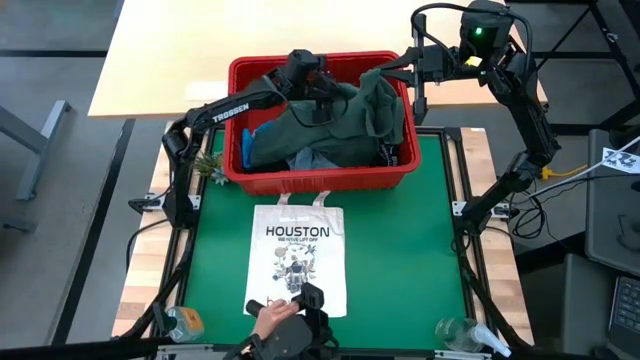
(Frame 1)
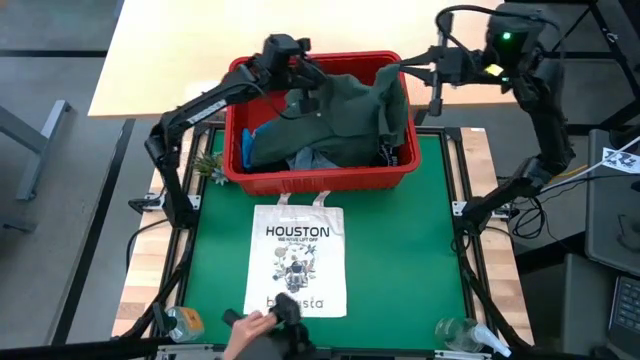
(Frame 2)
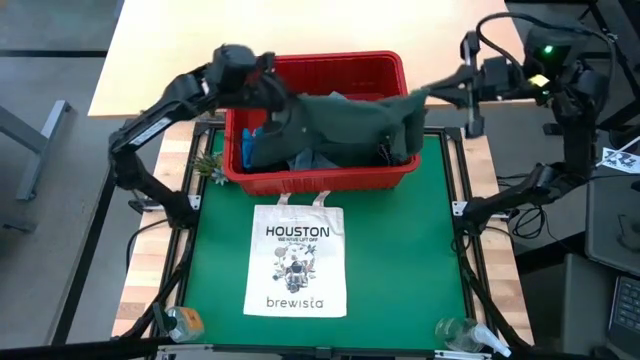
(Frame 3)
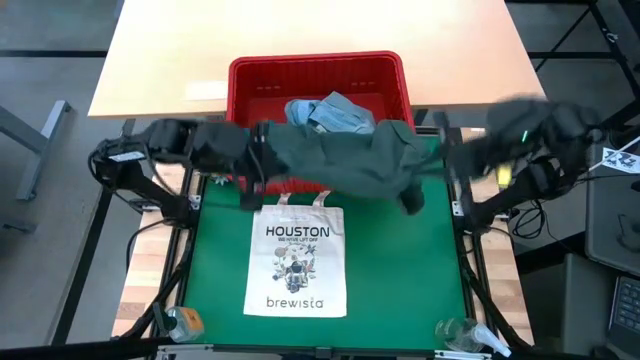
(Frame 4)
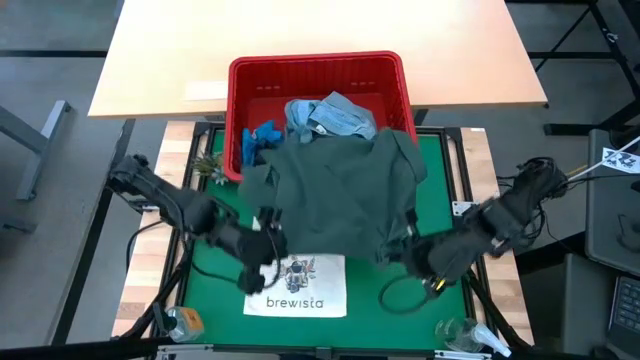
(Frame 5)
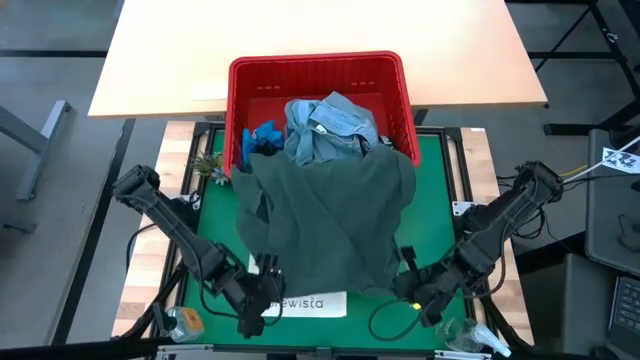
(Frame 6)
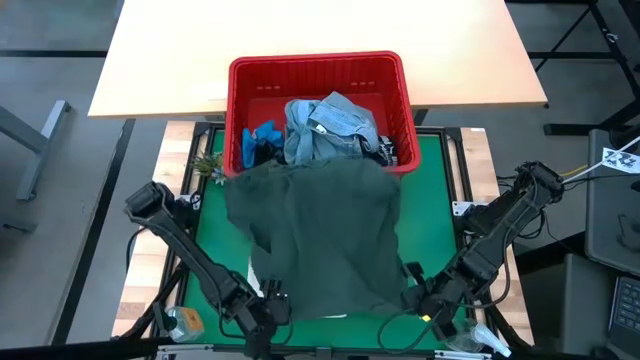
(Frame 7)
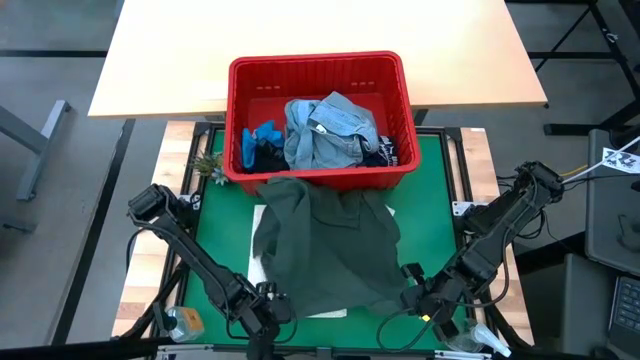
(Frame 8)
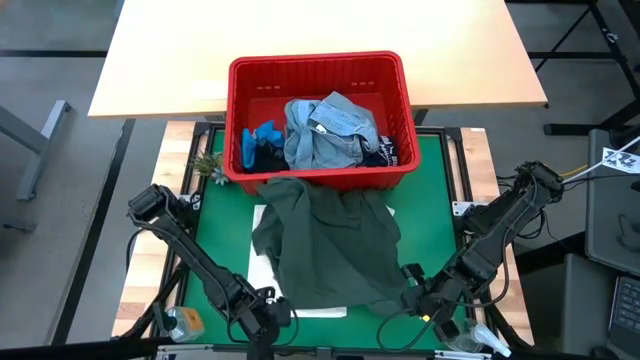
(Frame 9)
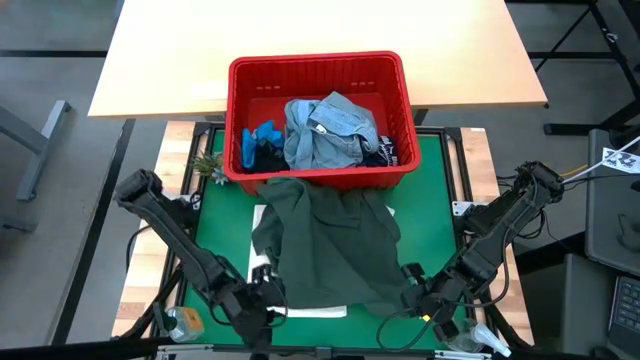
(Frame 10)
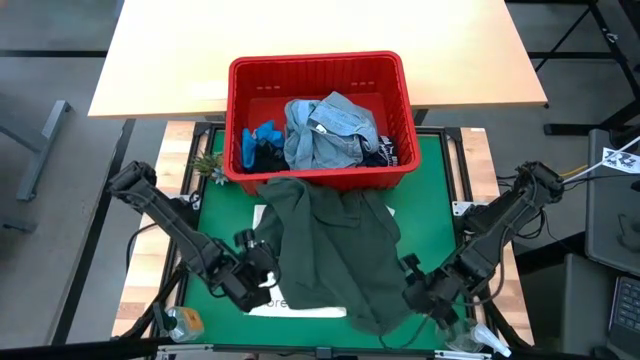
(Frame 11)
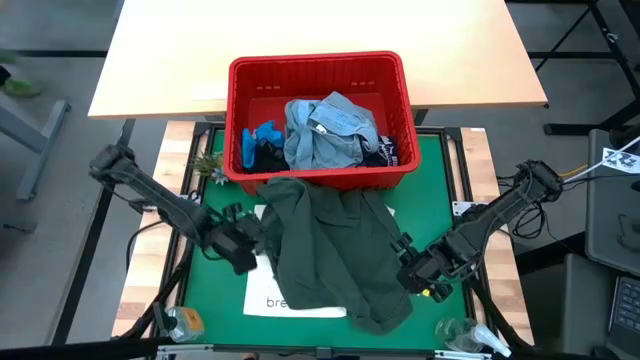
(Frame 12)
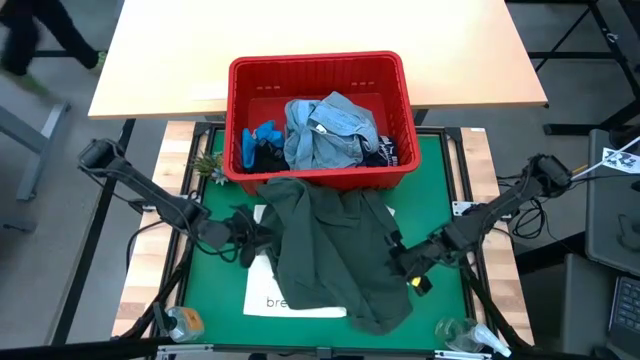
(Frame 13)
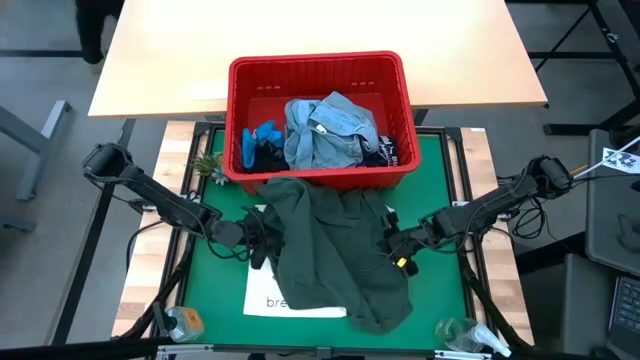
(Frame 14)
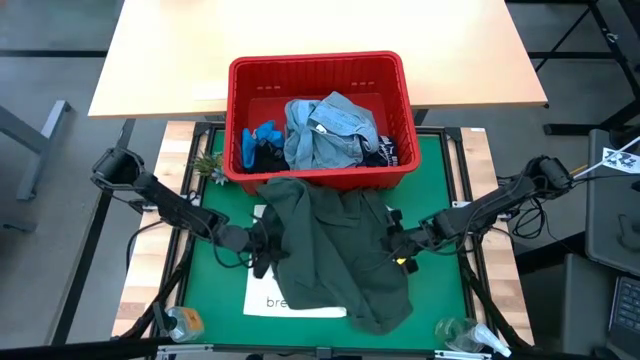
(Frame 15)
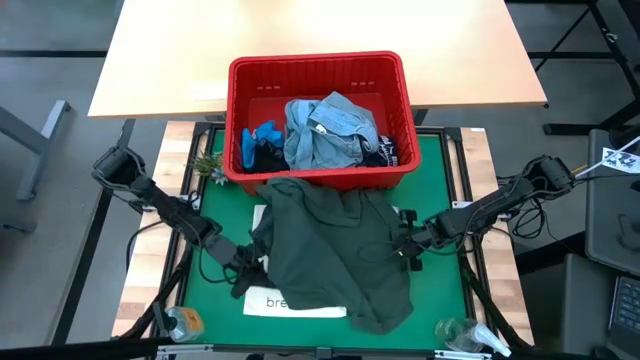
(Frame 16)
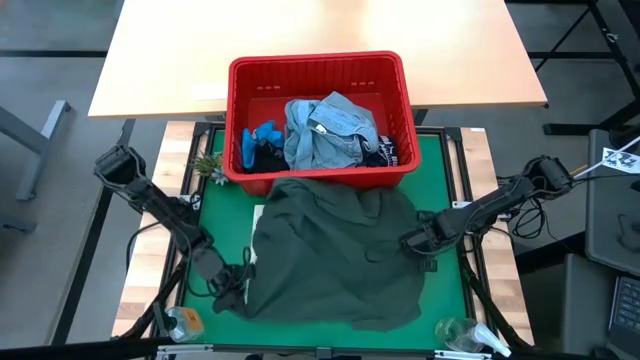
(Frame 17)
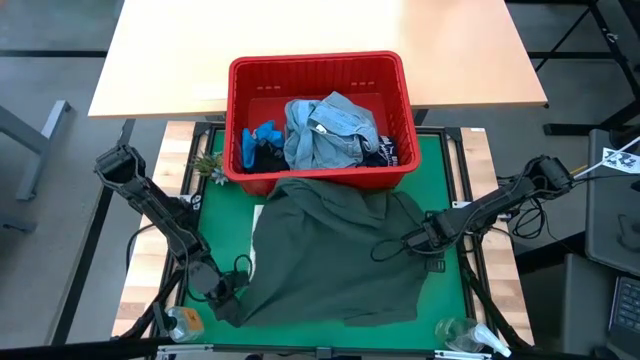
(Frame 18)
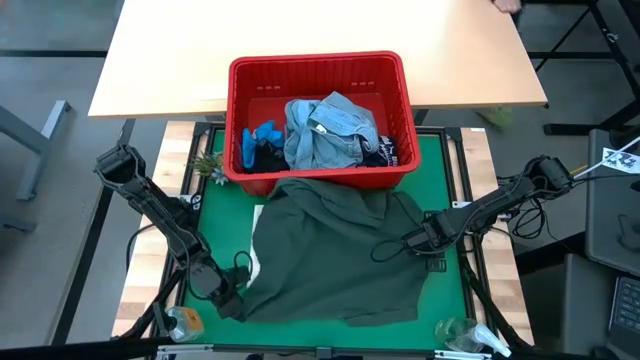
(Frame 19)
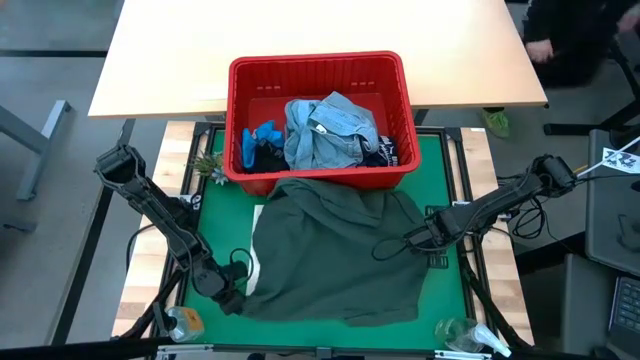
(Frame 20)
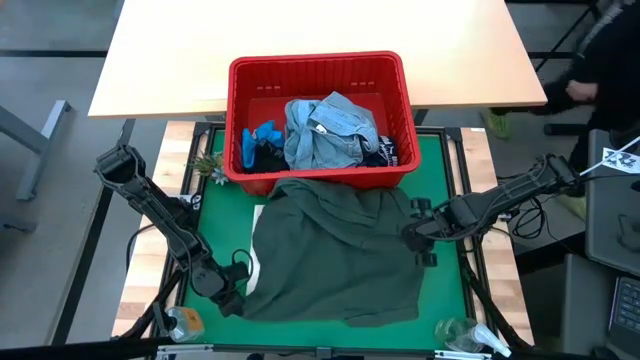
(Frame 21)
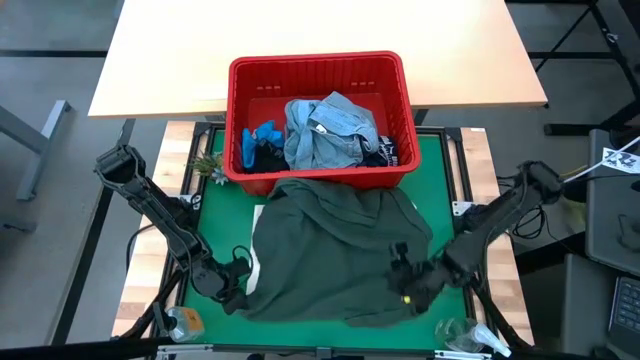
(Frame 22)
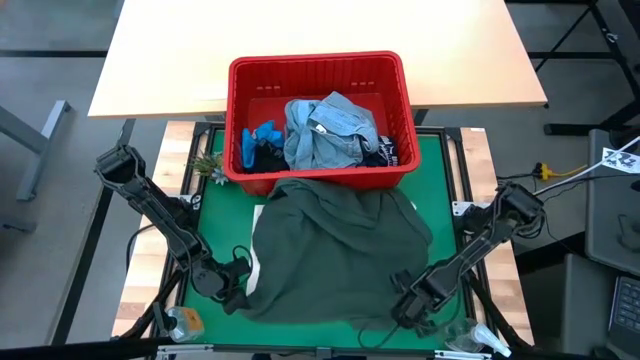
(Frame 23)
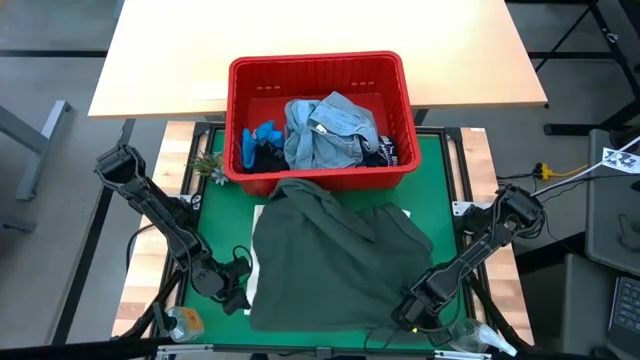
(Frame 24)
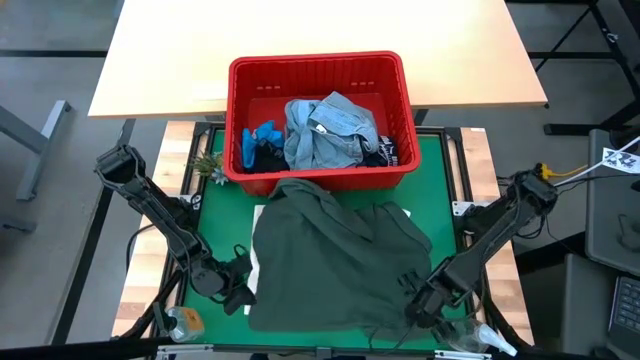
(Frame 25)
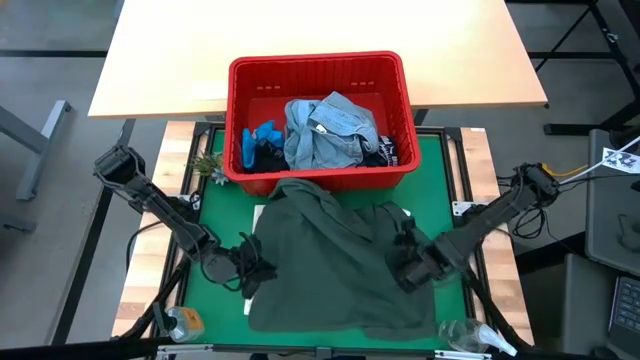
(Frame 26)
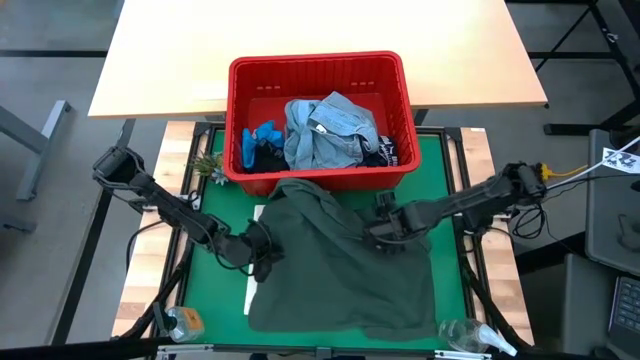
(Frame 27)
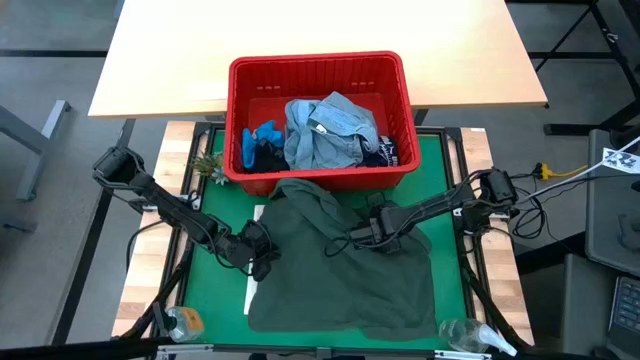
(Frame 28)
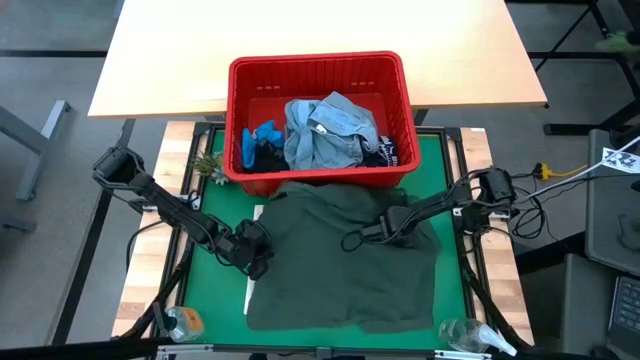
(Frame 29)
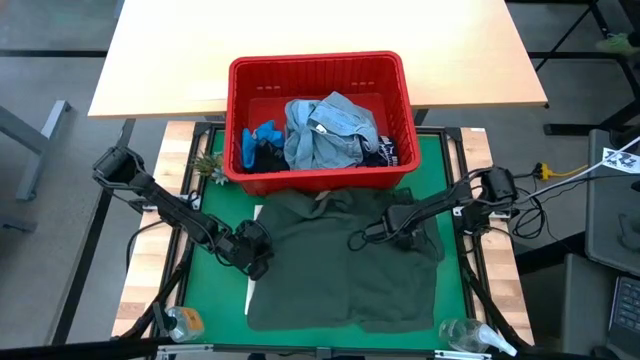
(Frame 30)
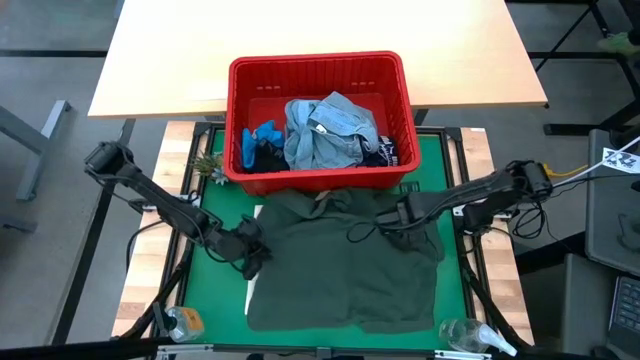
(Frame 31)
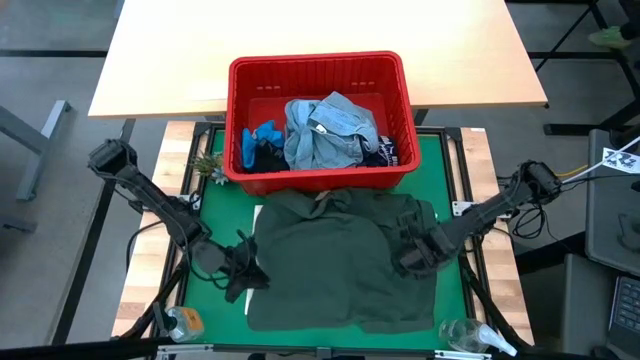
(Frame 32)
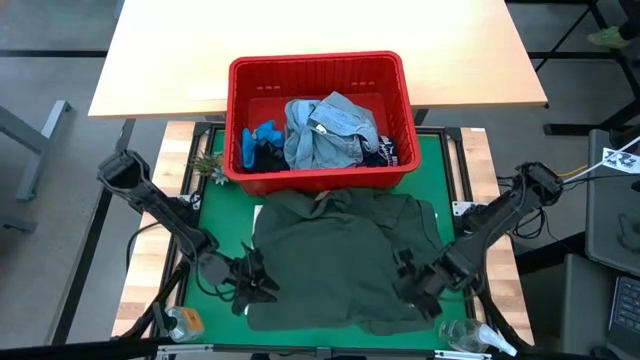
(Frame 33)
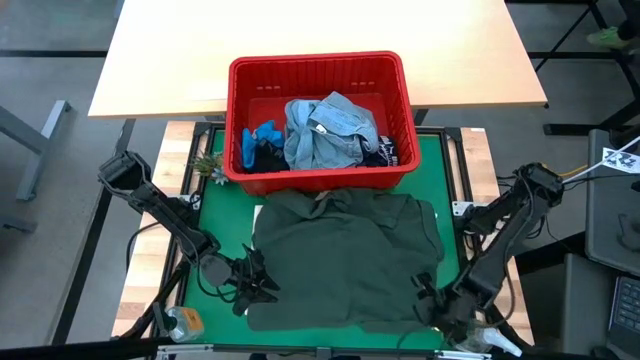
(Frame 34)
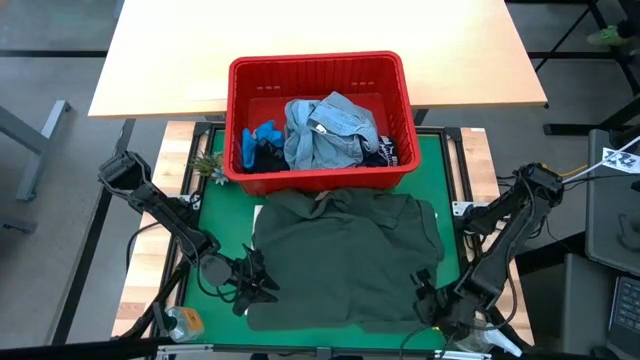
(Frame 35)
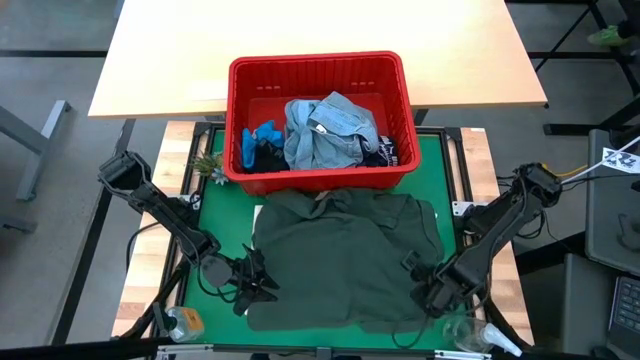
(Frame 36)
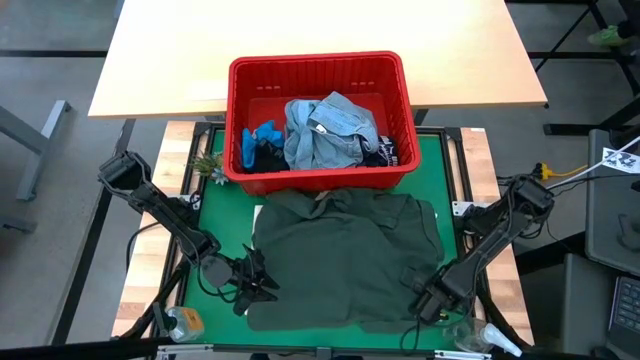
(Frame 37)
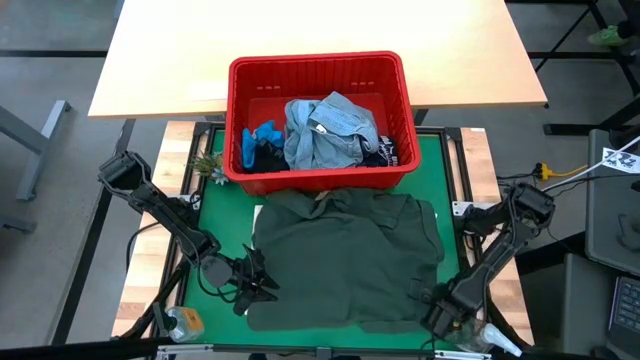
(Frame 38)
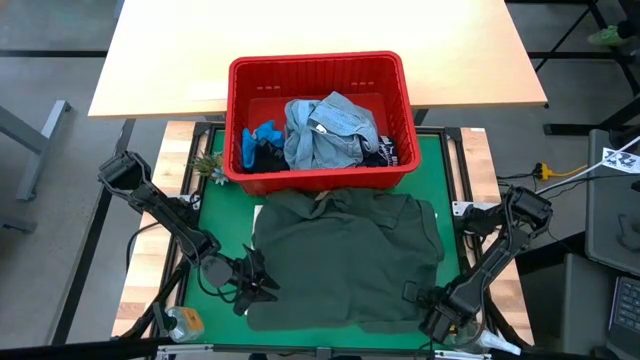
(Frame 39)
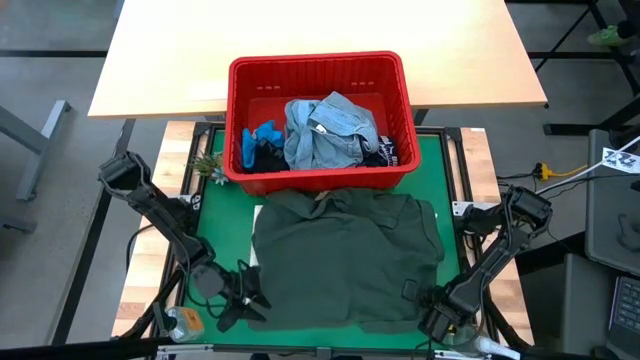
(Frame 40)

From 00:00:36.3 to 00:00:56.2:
Task: Fold Laundry from Bin
Fold the green t-shirt
